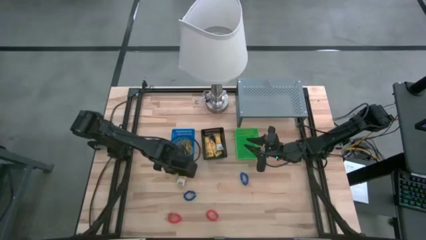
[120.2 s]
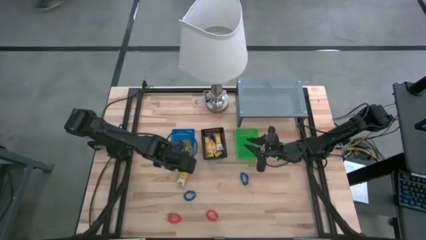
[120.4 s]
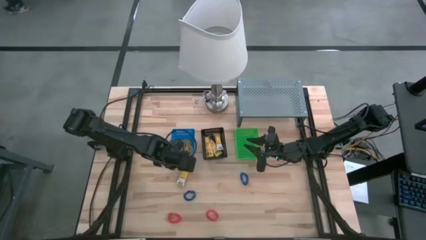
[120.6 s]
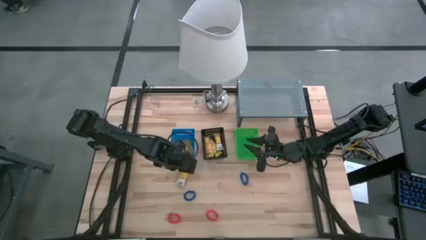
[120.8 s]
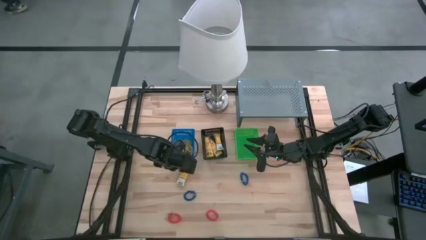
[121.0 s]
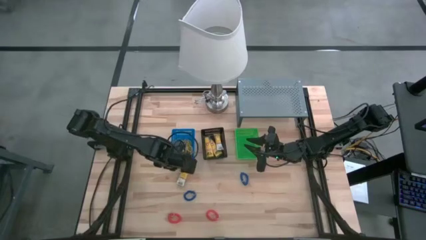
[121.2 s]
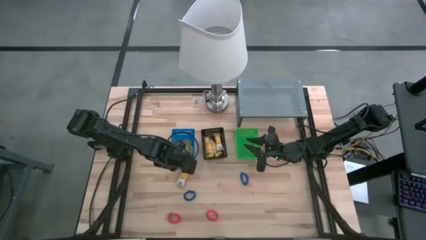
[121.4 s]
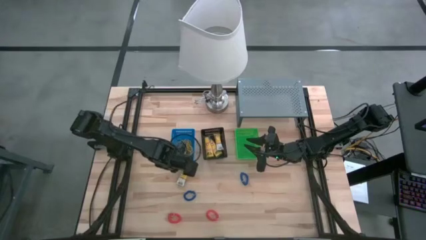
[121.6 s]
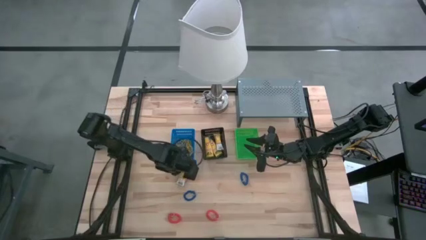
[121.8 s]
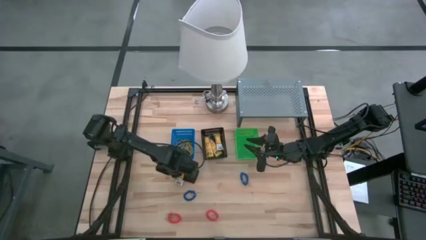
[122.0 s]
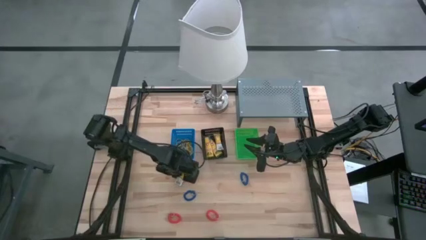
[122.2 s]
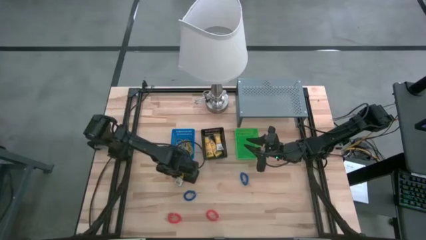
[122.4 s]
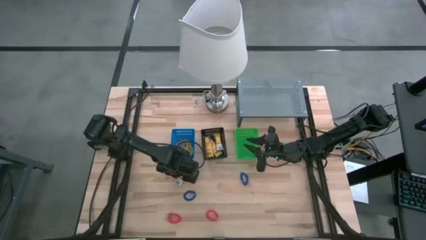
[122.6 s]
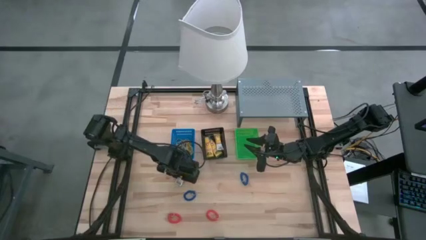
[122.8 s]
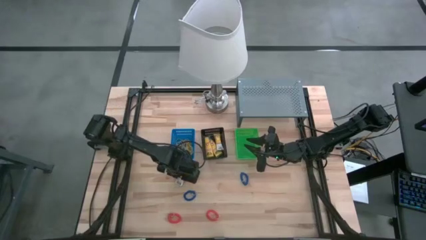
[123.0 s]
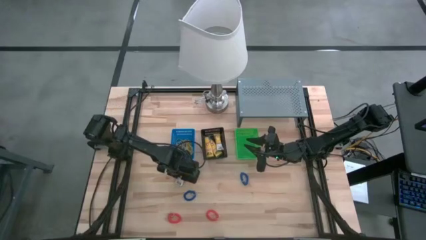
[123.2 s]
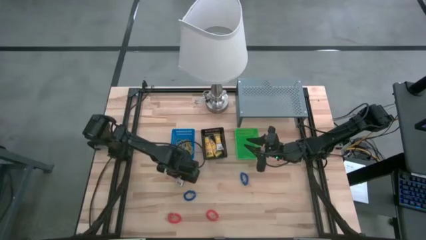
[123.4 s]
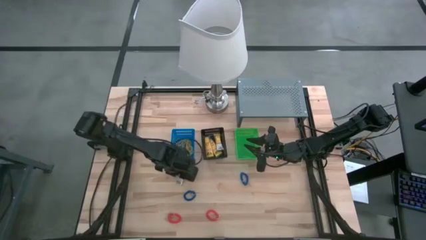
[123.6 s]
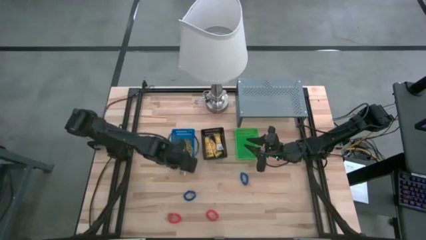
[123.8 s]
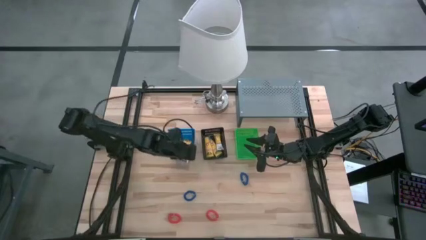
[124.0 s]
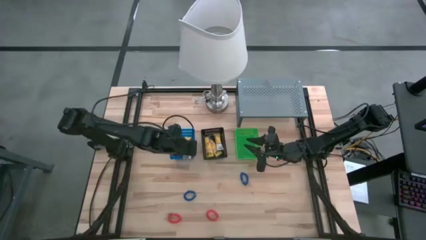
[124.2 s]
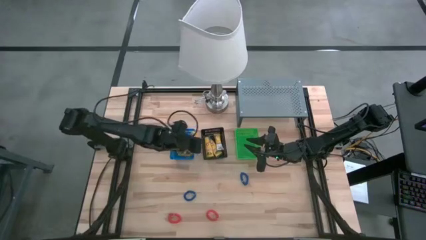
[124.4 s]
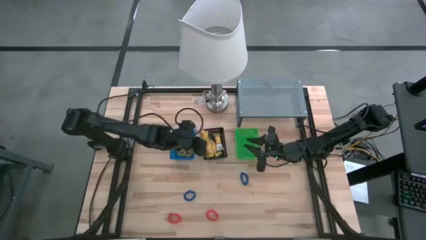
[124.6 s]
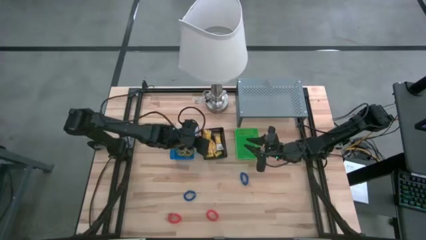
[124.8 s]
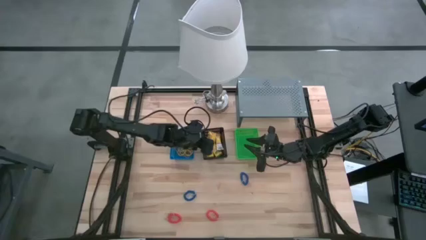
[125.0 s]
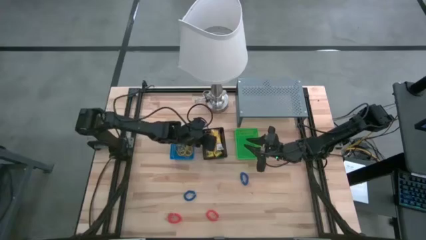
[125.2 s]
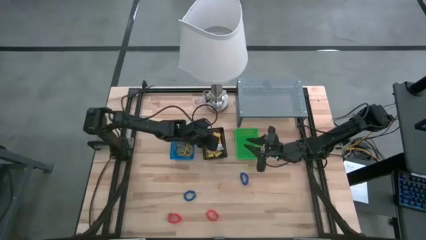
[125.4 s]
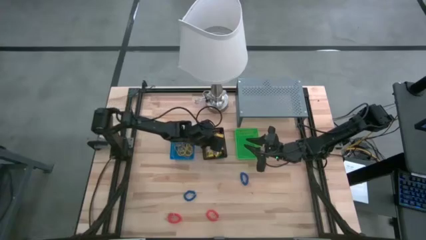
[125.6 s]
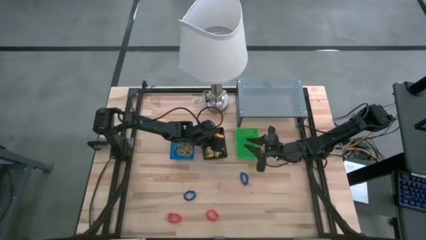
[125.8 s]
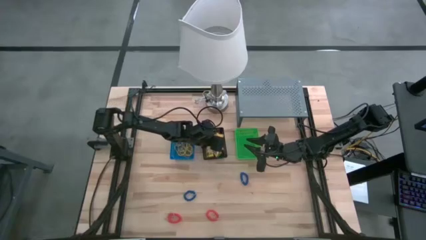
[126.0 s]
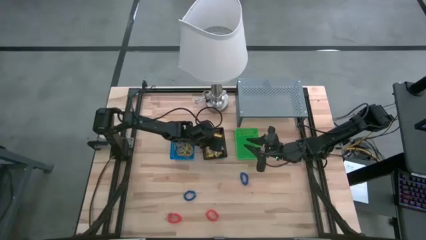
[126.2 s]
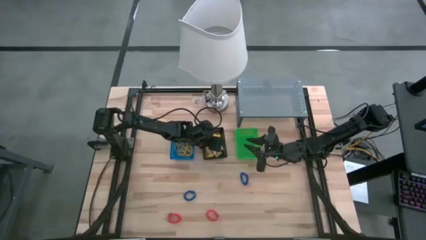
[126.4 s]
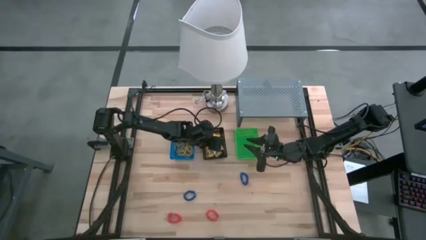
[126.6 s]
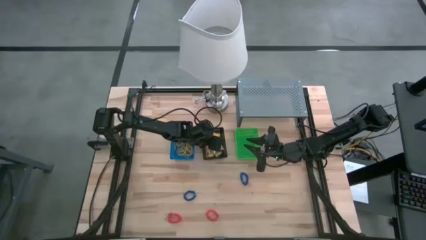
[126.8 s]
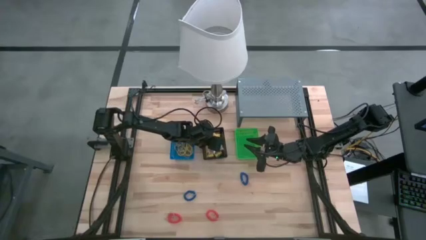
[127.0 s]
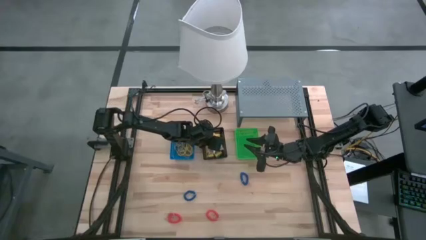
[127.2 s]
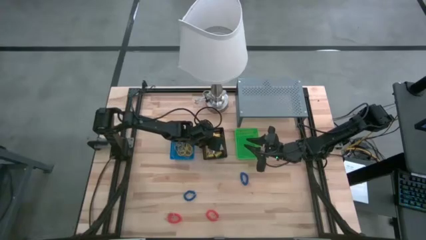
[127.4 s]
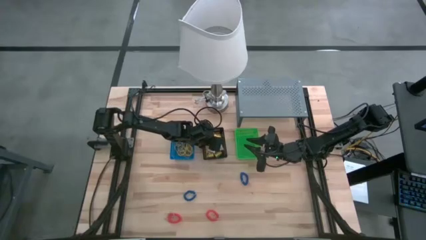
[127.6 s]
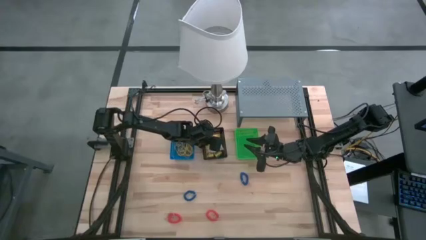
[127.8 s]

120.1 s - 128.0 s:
Task: Pick & Place Office Desk Supplies
Put the yellow crayon box into the black bin

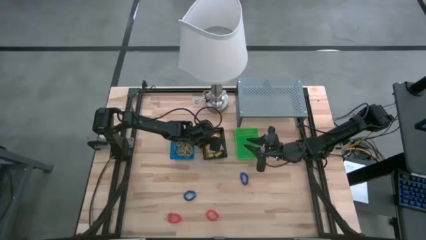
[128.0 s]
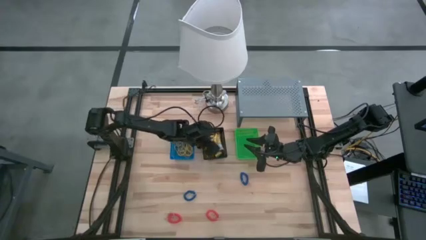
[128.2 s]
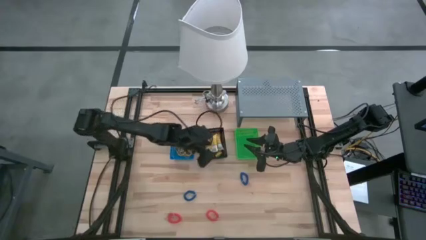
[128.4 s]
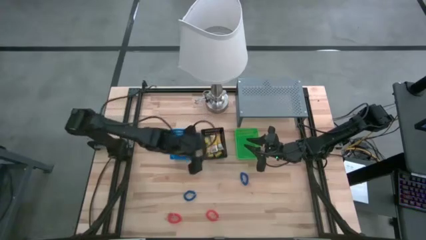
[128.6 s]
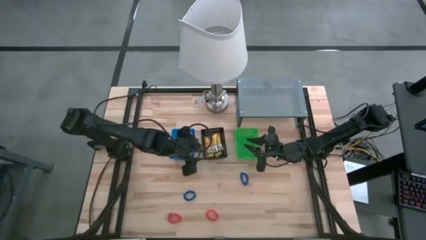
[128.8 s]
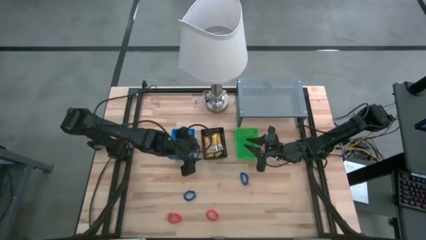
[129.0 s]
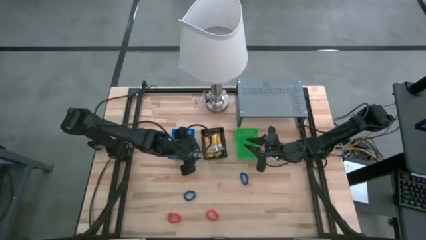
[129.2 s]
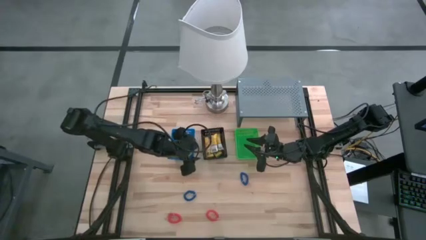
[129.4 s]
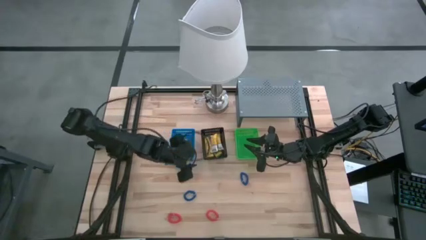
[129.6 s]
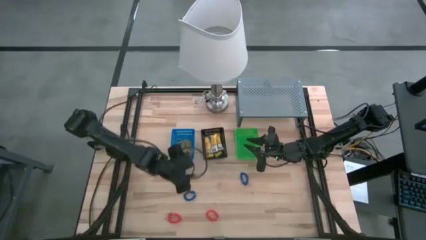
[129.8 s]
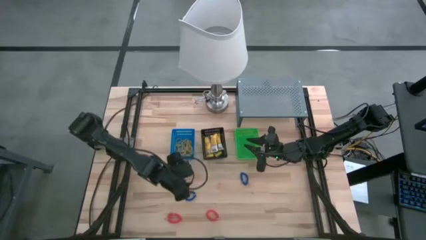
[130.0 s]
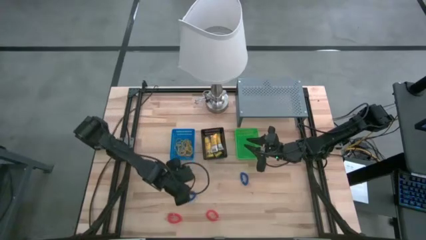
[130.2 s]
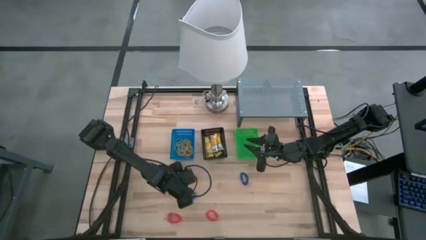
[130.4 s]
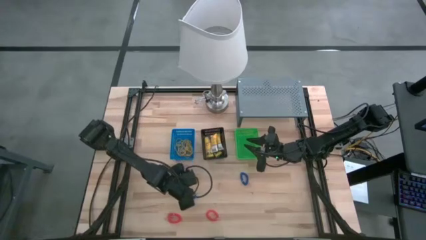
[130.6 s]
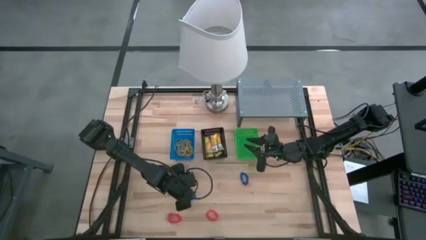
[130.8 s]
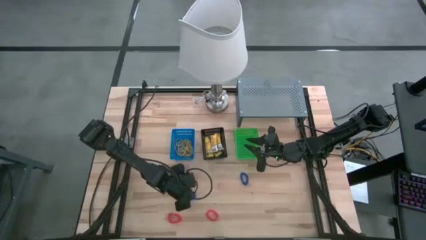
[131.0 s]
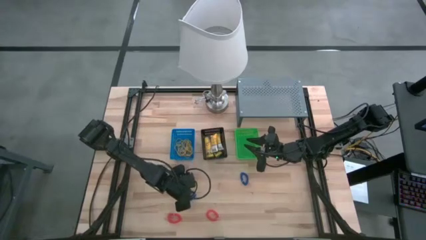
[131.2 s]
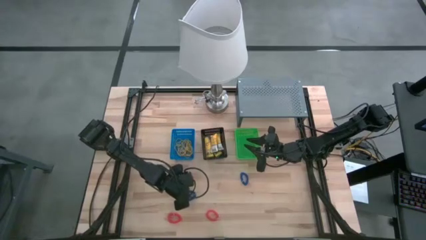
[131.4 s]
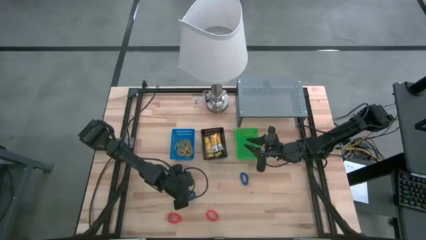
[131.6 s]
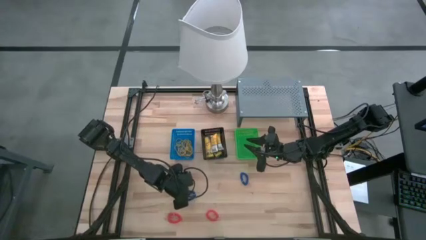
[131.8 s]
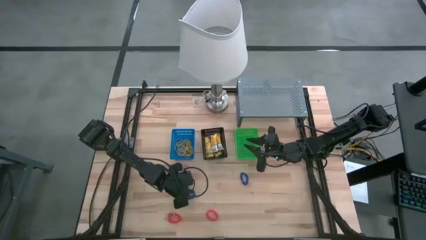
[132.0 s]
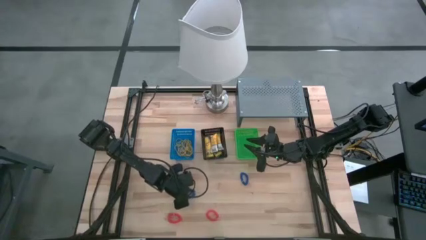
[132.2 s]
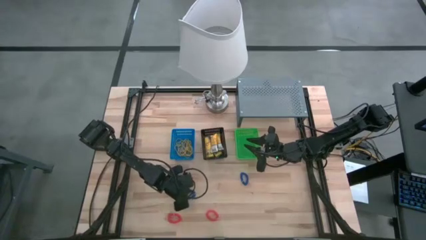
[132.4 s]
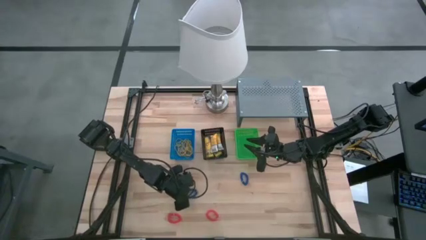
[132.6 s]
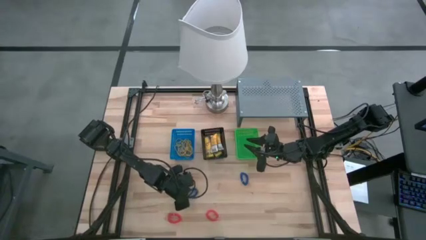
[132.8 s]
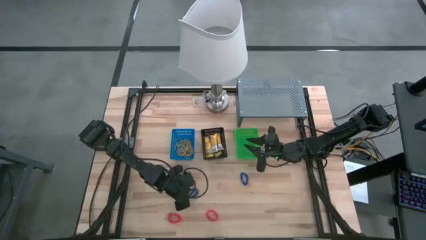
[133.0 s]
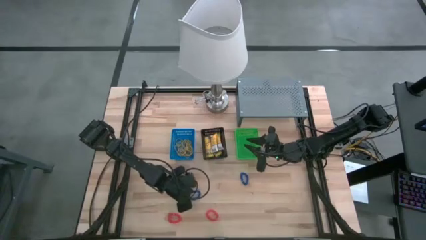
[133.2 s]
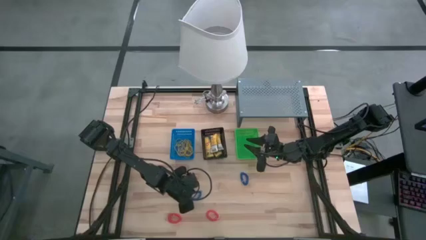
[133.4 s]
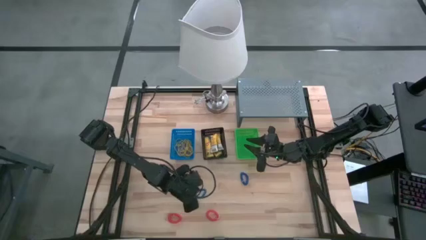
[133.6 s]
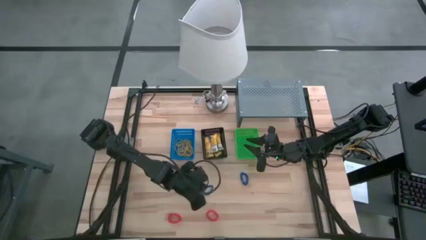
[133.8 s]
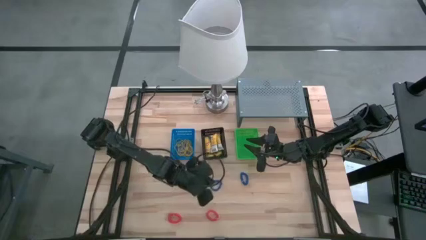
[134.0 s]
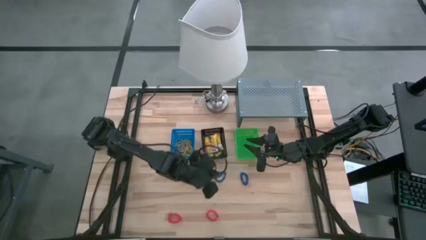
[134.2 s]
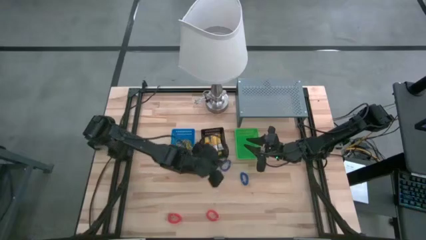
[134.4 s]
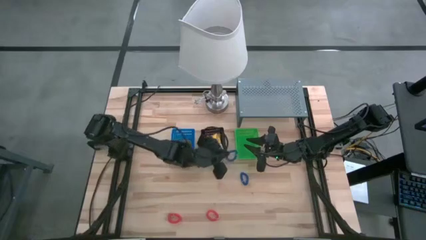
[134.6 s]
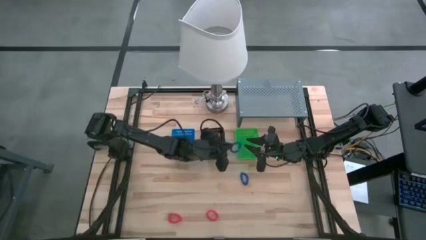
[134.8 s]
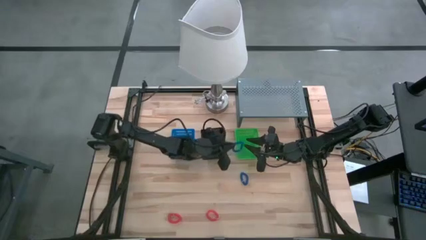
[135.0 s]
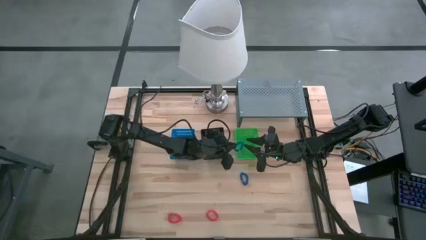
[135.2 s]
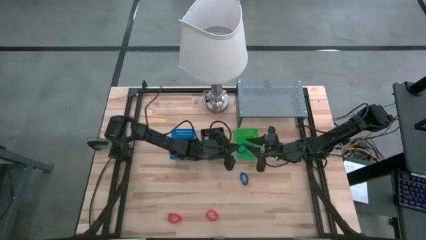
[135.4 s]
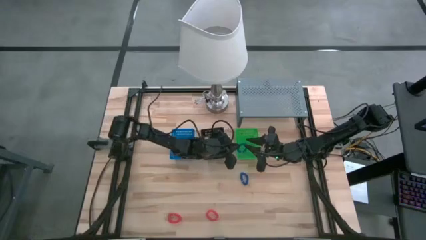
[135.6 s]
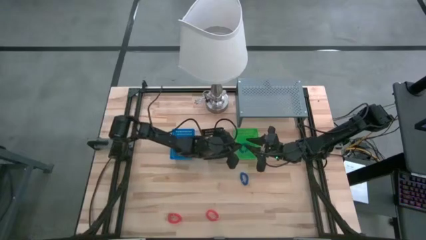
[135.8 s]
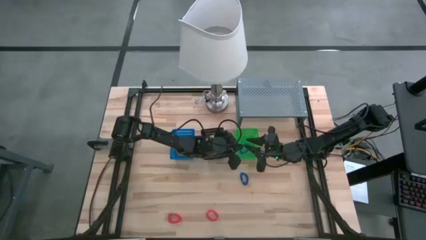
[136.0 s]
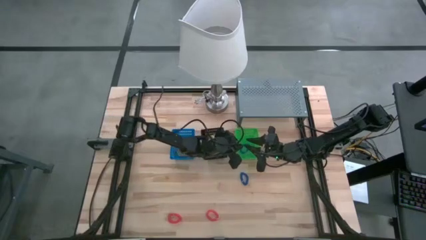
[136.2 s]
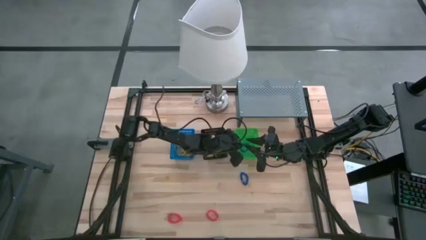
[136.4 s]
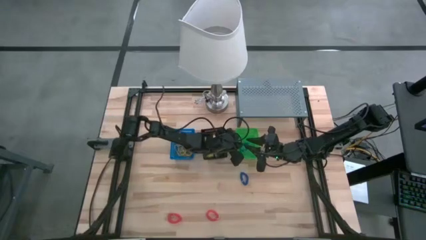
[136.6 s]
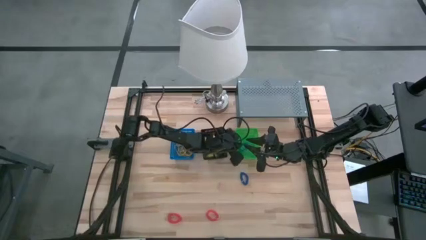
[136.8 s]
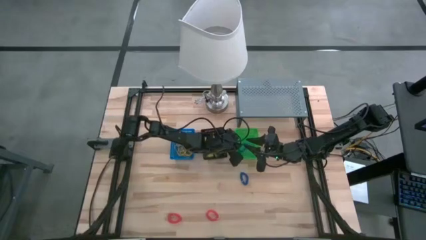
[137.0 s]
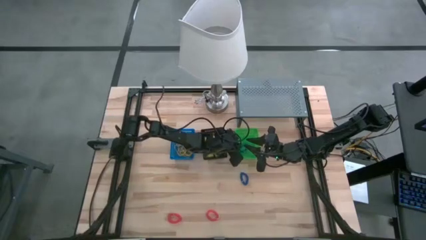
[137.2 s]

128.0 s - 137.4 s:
Put the blue spring keychain into the green bin
